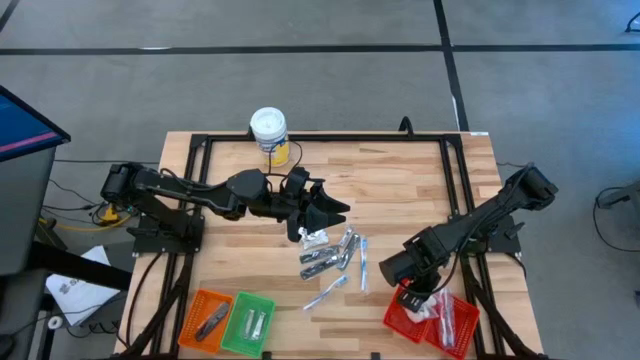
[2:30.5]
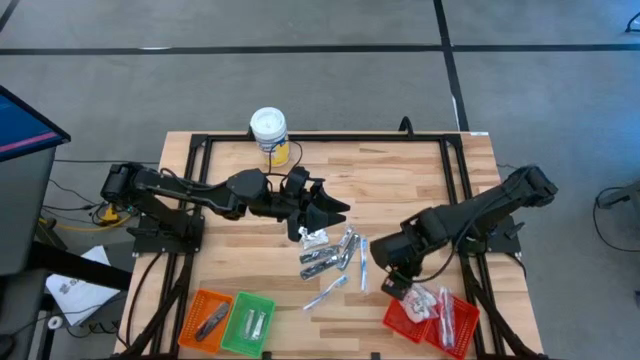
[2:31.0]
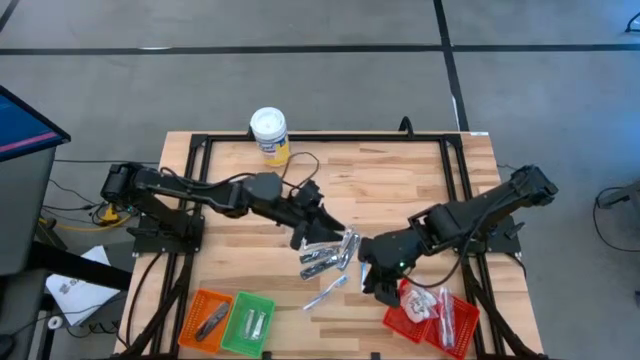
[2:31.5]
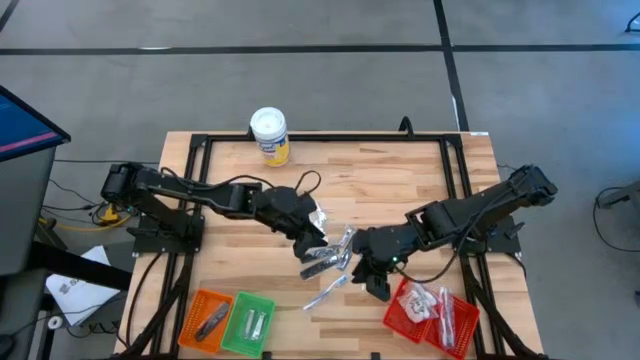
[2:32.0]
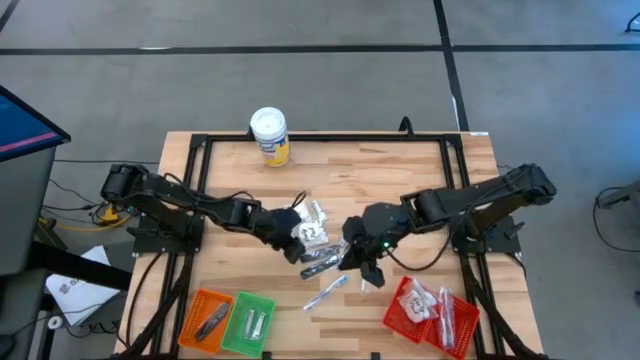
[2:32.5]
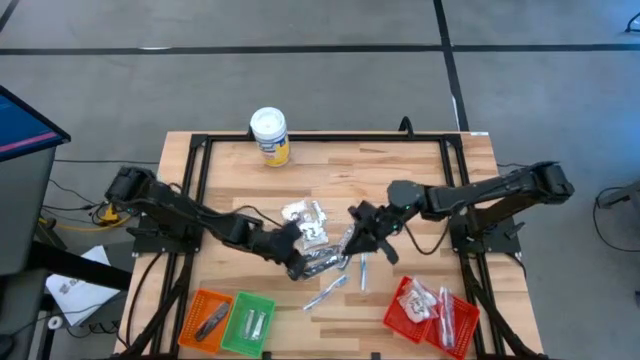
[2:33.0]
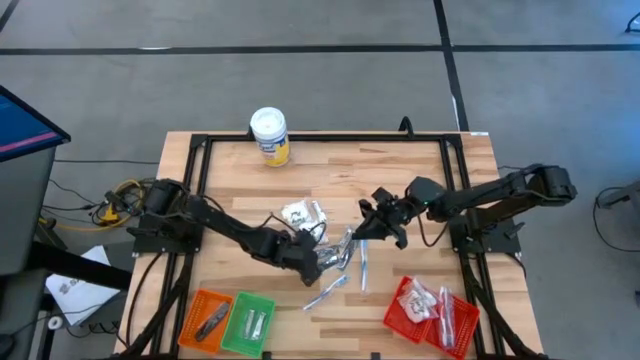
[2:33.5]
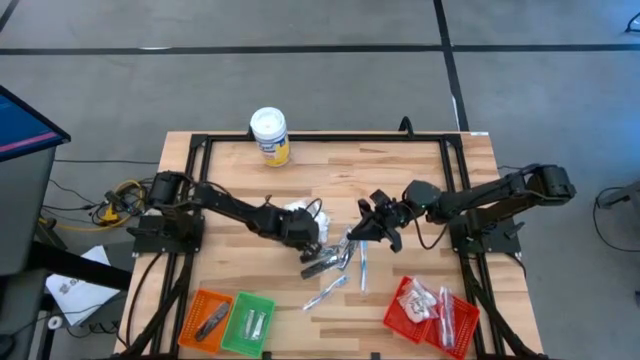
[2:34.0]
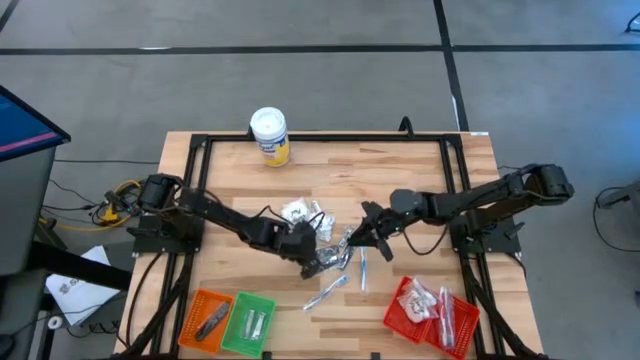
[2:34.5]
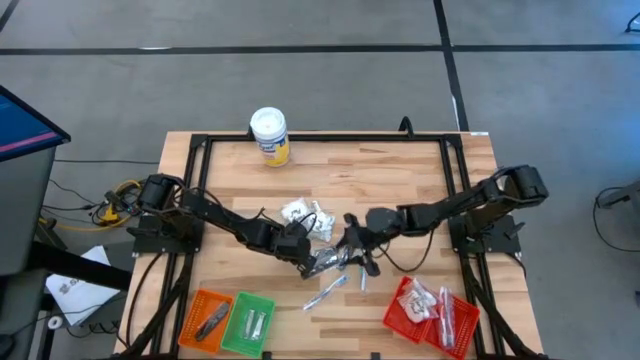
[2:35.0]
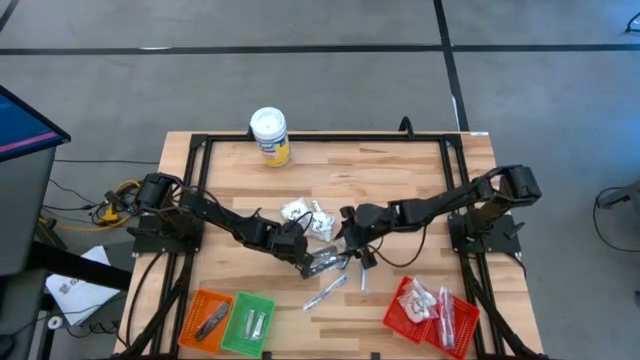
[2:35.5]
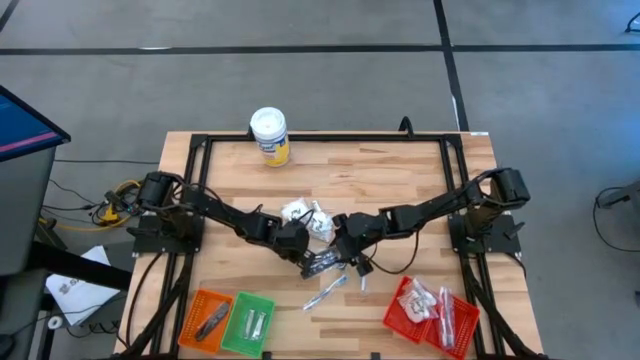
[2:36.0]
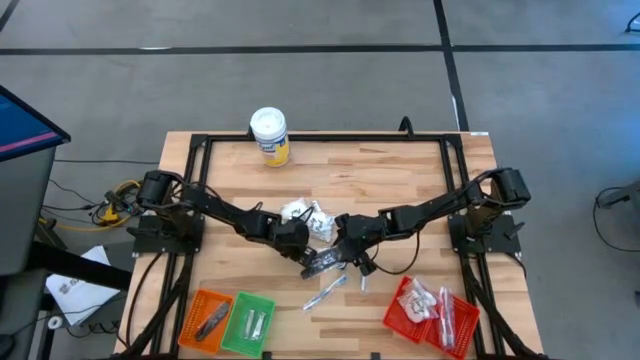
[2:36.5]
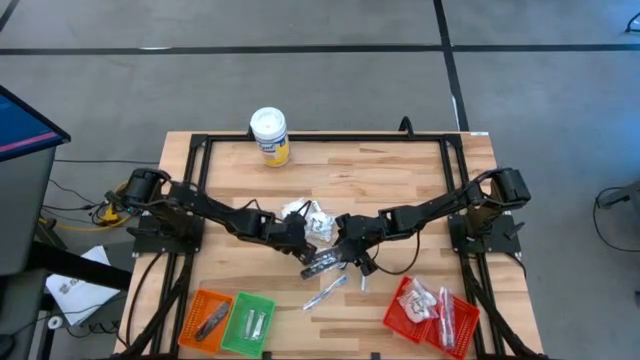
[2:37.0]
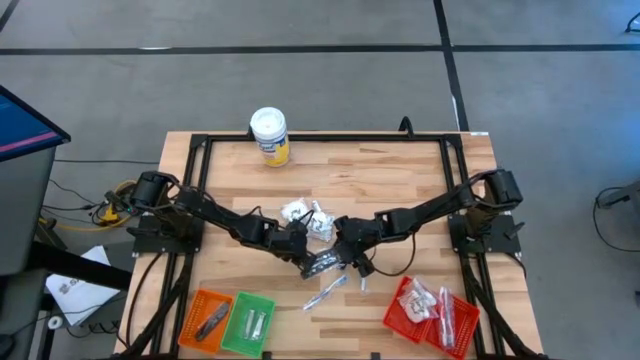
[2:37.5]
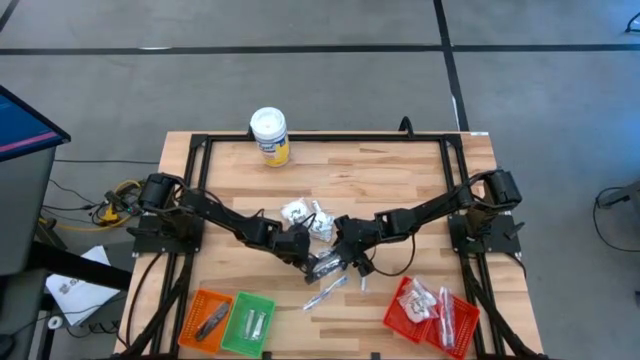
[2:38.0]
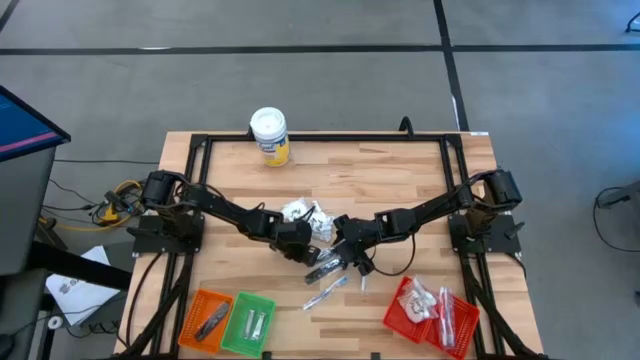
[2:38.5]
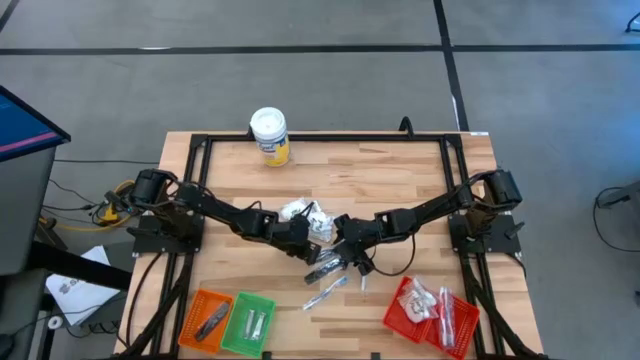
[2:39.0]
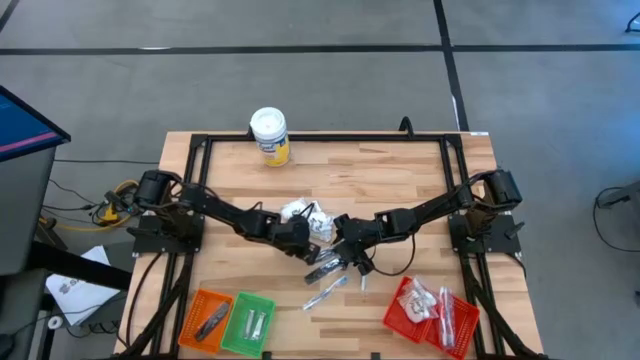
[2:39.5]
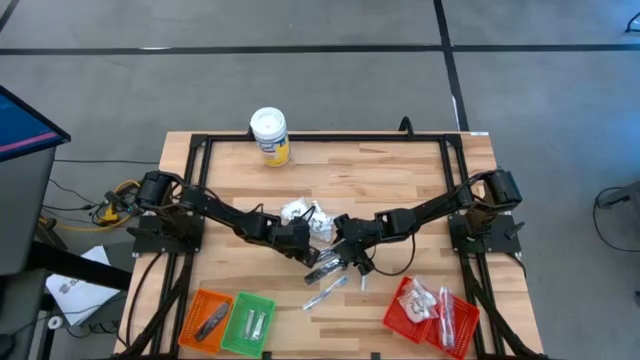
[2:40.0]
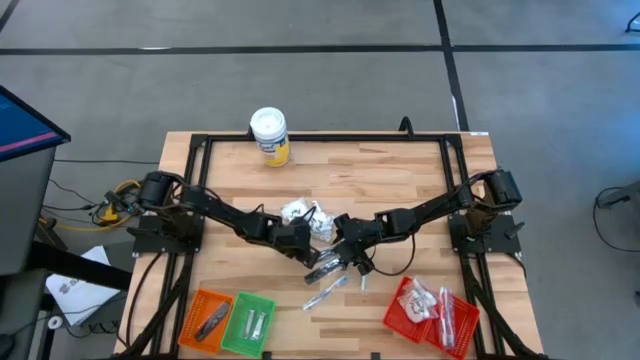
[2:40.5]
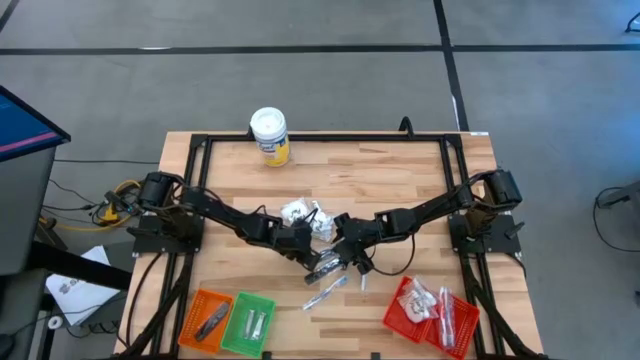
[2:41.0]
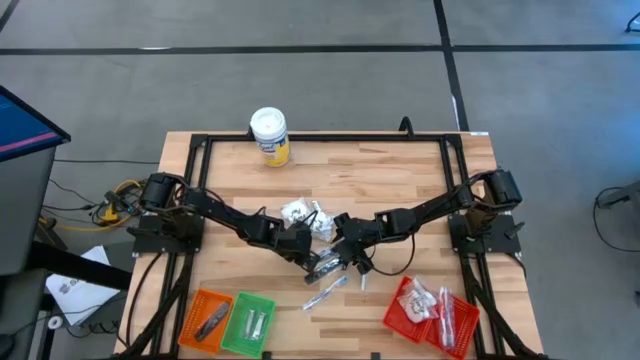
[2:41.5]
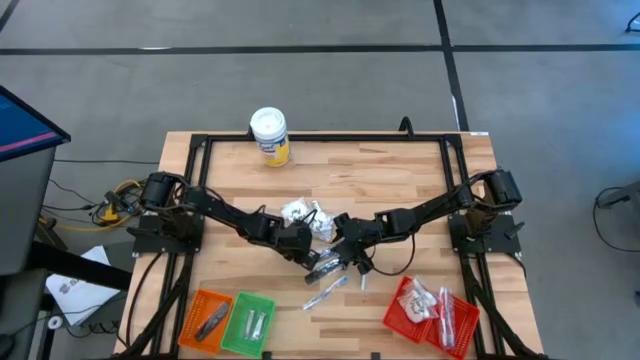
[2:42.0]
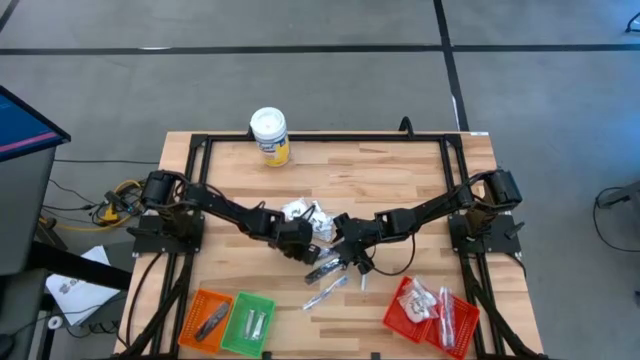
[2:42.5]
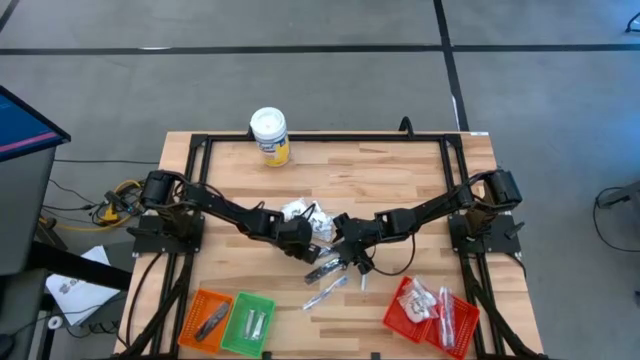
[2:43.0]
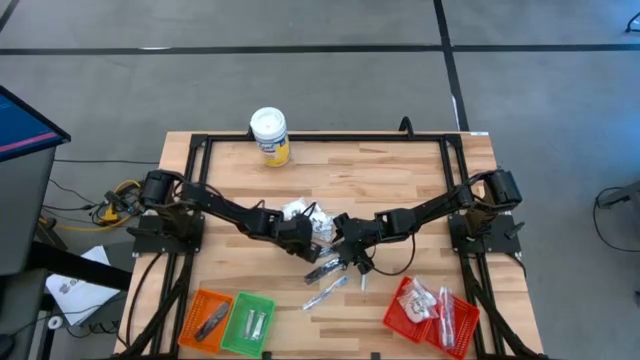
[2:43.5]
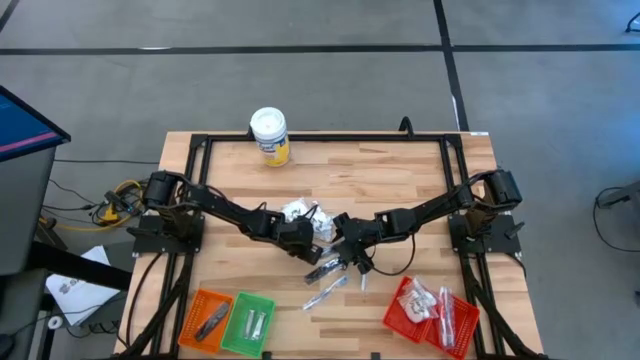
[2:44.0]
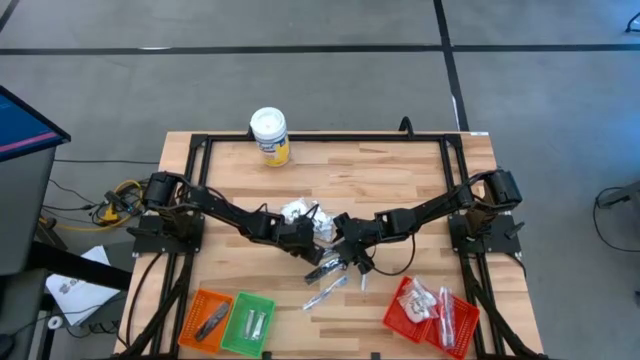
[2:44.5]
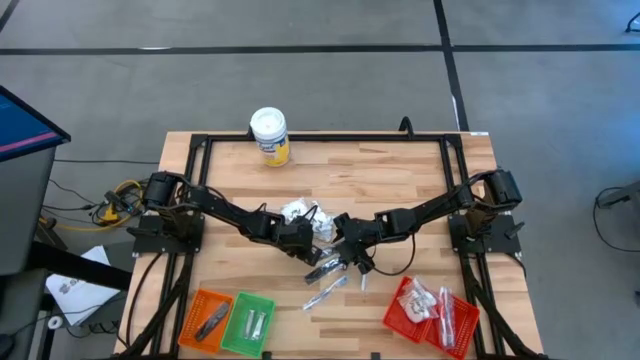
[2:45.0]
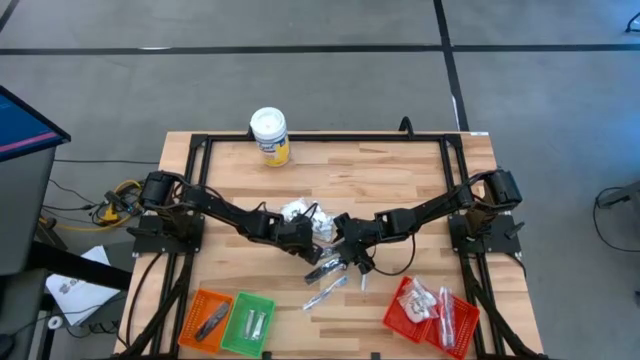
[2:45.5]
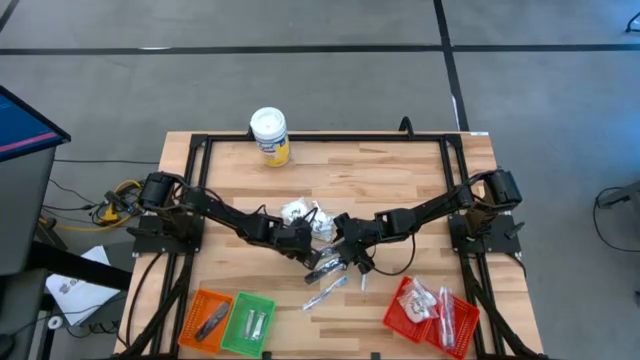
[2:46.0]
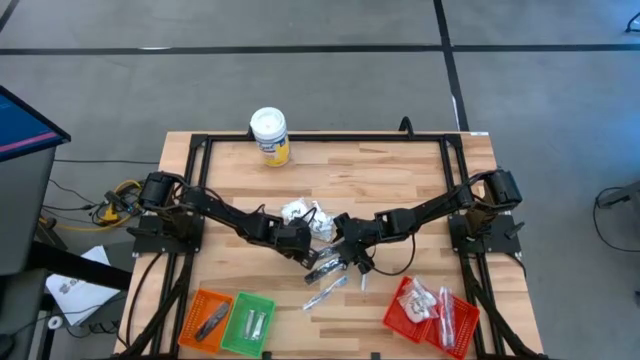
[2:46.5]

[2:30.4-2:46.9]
Task: Pick & Place Travel size toiletries
Put the black comb into the orange basket

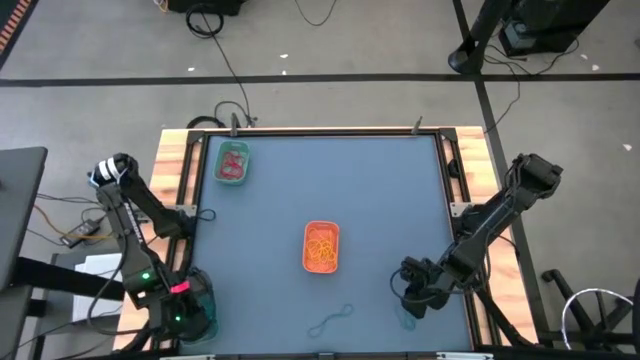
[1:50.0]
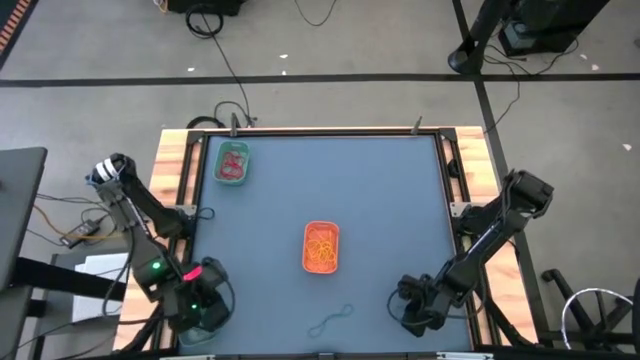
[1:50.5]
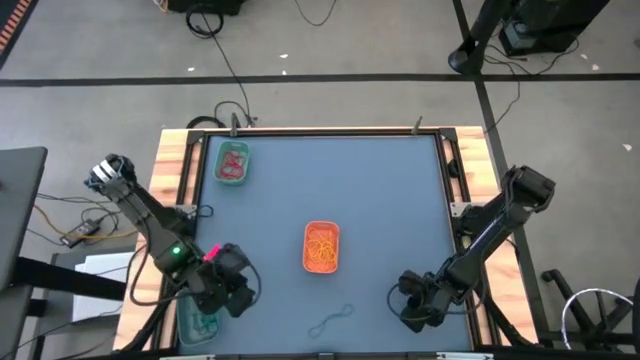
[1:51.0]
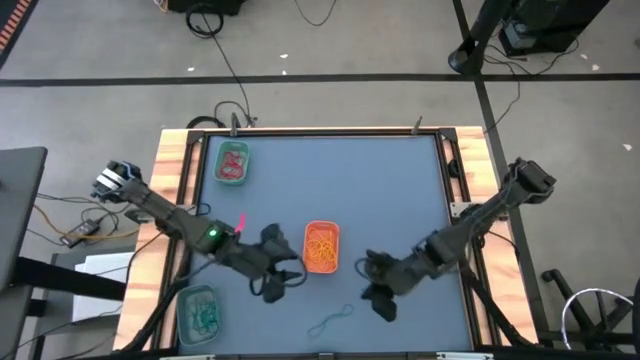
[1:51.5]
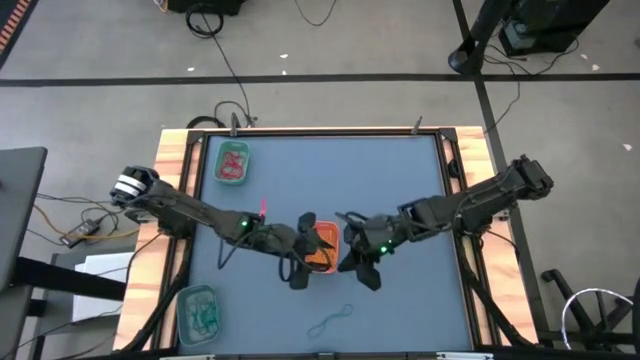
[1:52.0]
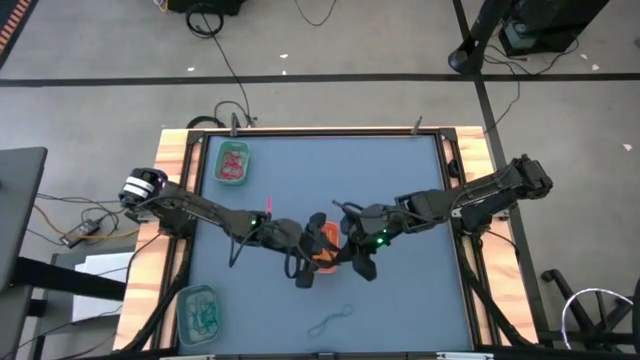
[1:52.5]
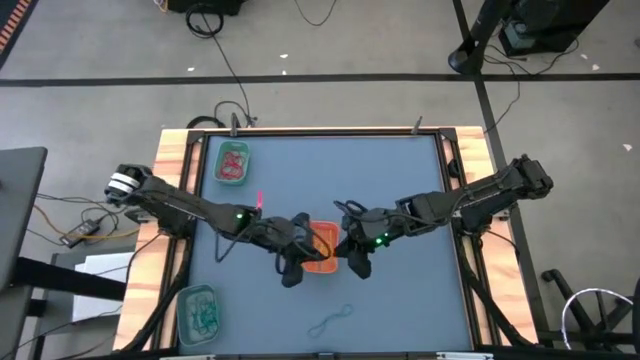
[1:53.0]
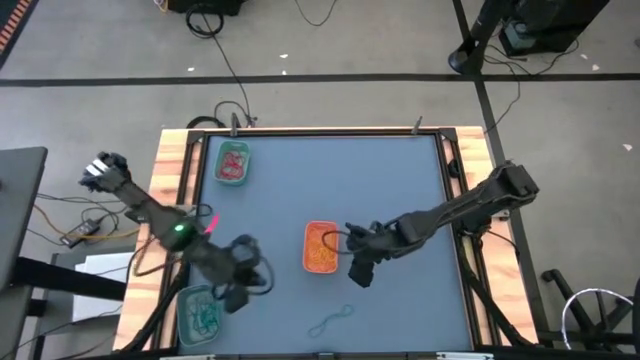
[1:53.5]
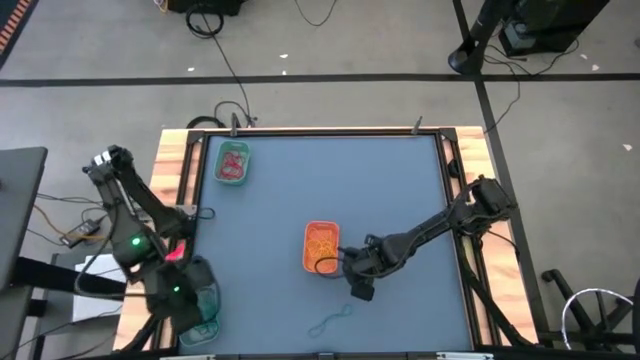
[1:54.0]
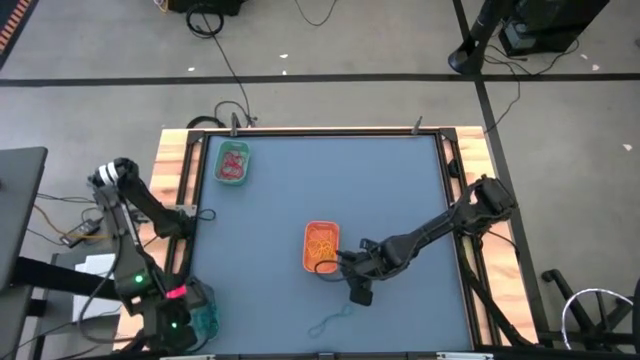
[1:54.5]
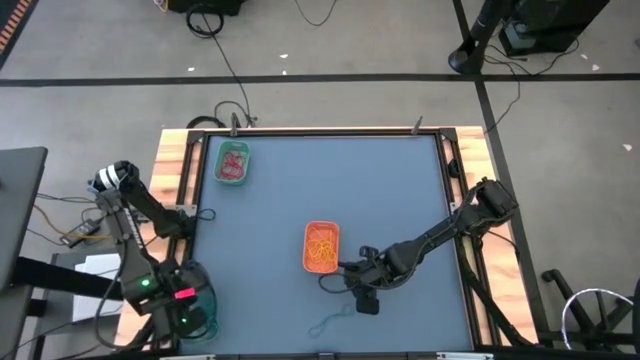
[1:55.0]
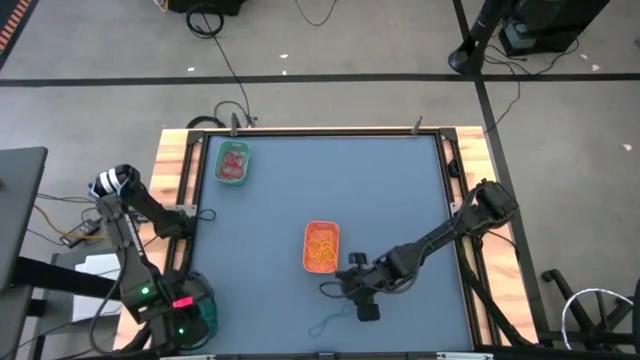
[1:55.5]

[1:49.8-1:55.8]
Task: Sort rubber bands into baskets
Put the blue rubber band into the blue bin
